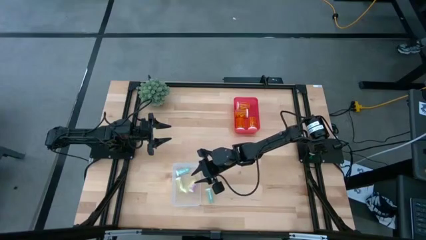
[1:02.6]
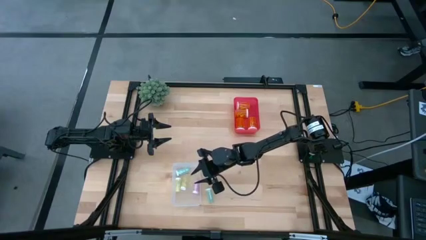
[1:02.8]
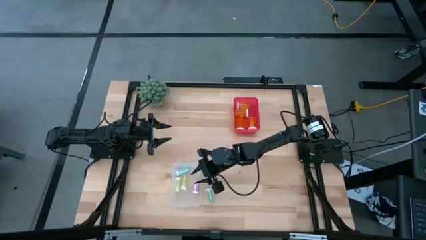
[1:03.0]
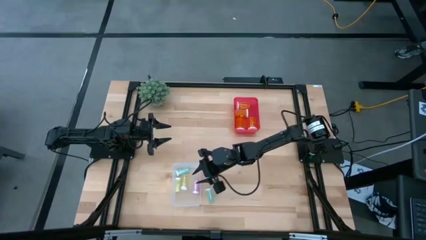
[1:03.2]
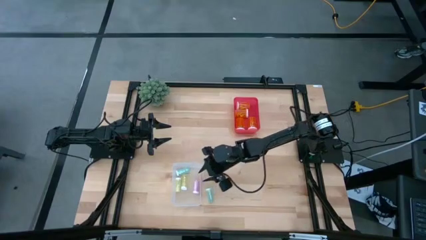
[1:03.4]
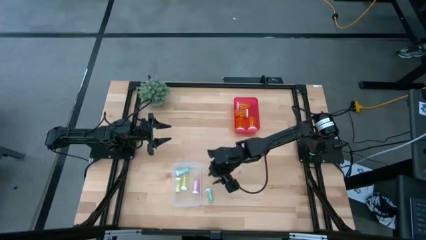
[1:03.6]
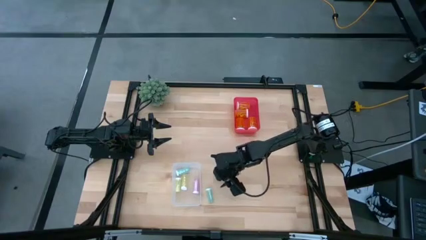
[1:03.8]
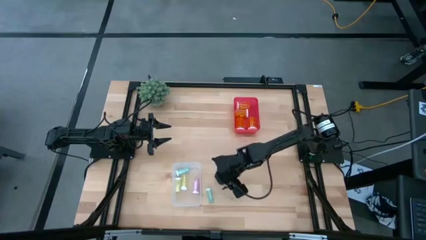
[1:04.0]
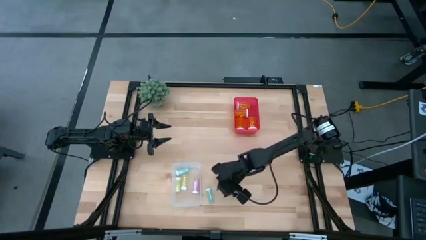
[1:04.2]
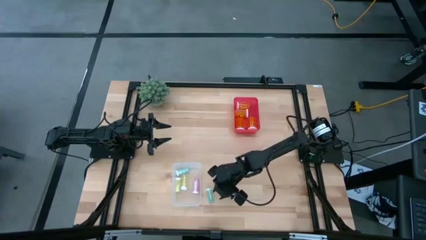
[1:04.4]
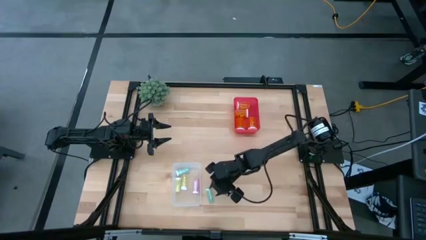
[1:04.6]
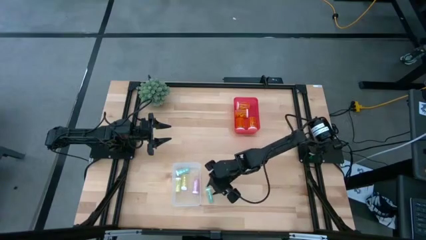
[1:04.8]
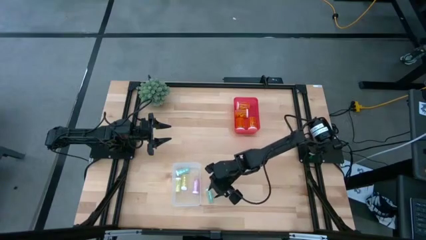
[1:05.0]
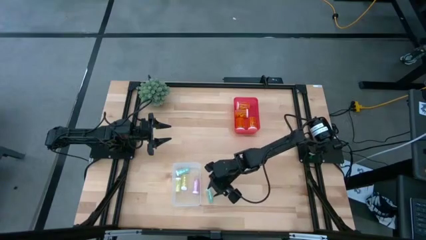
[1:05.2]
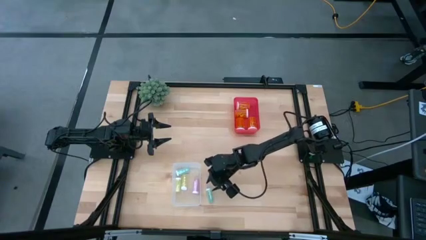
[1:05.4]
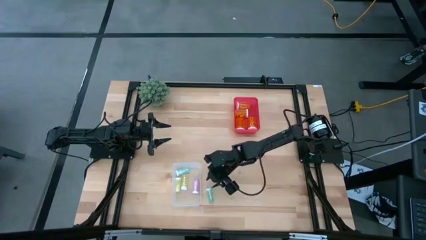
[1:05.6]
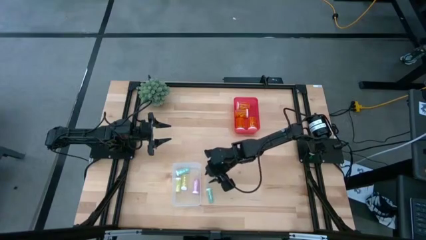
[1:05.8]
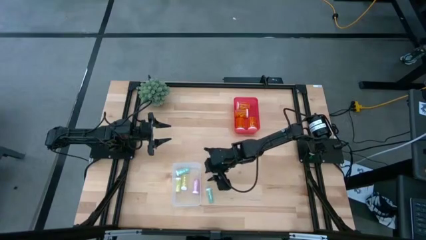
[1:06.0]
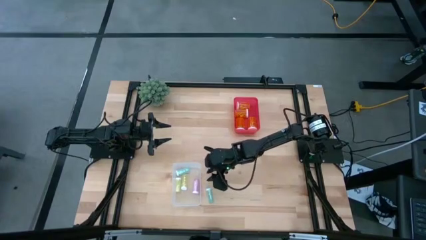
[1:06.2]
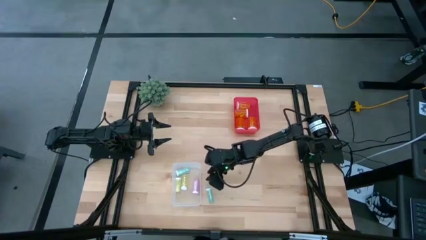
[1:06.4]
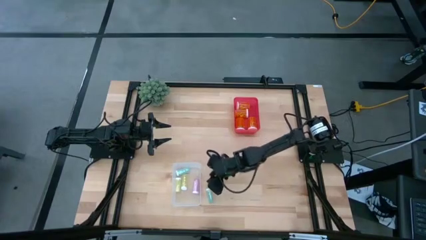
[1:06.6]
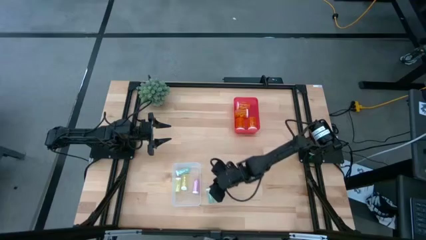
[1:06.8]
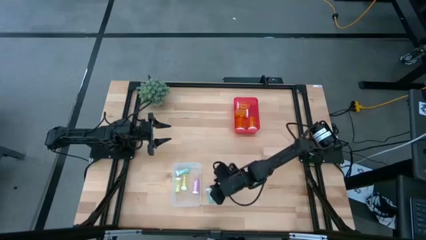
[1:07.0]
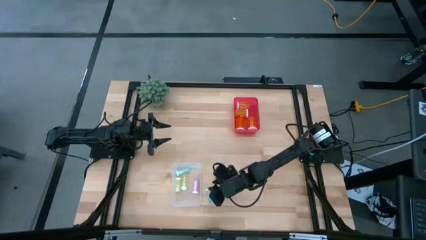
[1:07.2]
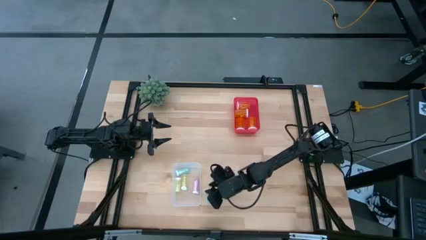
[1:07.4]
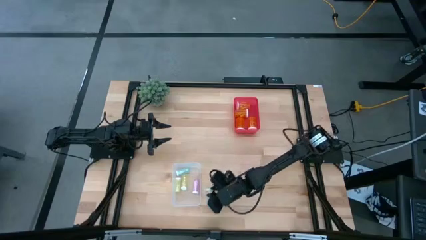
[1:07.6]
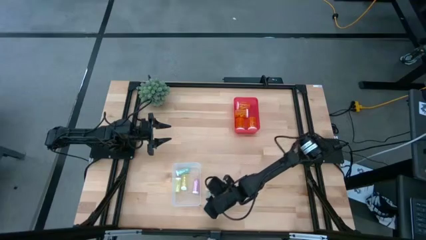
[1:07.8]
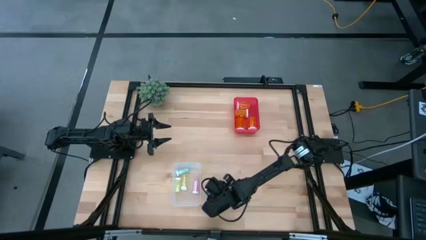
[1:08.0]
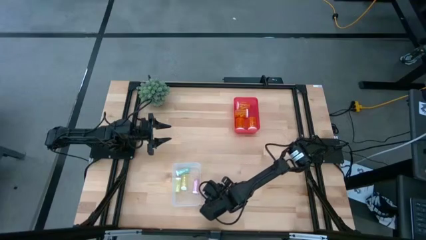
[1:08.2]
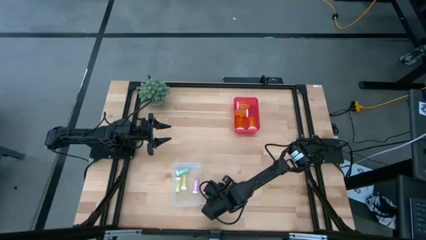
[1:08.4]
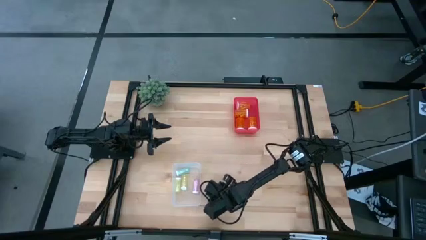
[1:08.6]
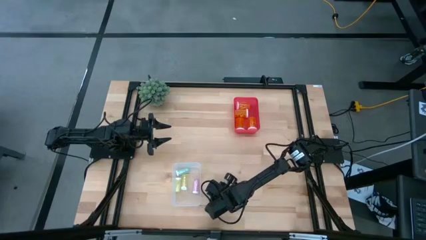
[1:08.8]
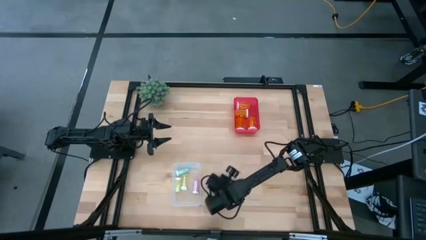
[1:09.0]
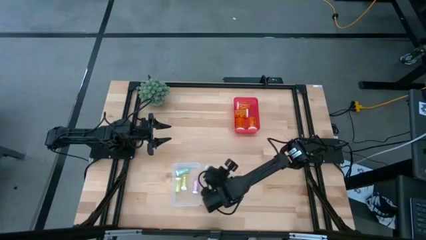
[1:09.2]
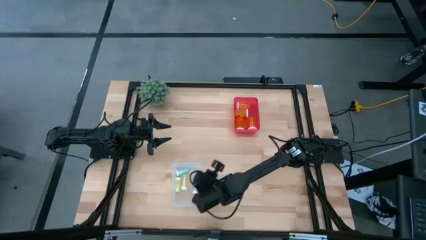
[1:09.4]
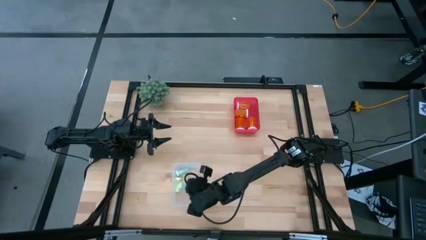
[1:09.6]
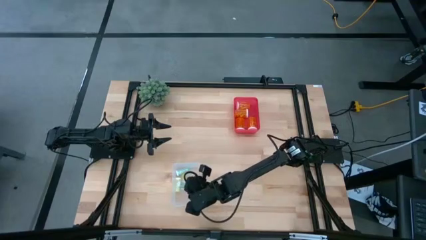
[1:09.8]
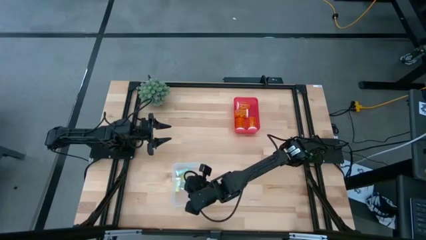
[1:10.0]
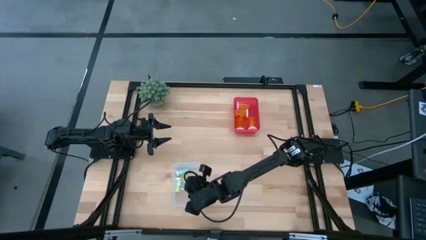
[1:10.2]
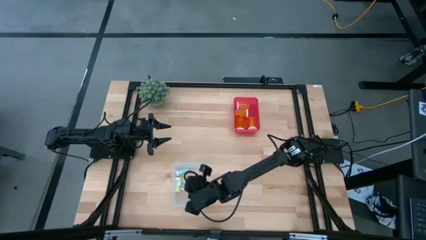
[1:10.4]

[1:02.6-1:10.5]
Task: Pick and place medicine bottles into bin by pill shape (circle, oval)
Put the small green pill bottle into the transparent bin

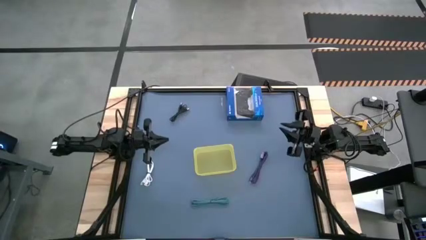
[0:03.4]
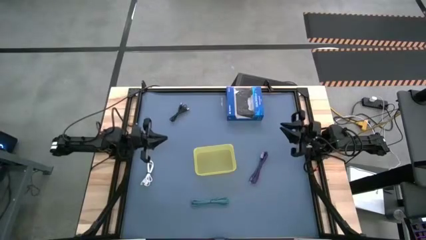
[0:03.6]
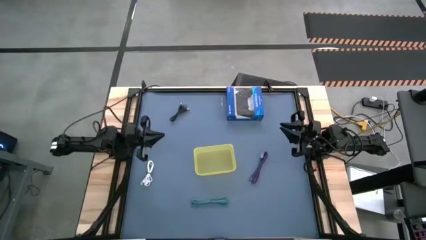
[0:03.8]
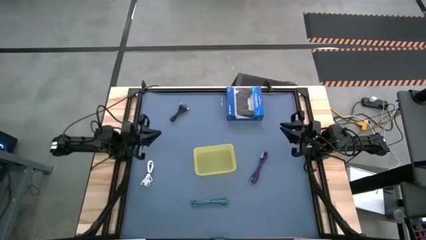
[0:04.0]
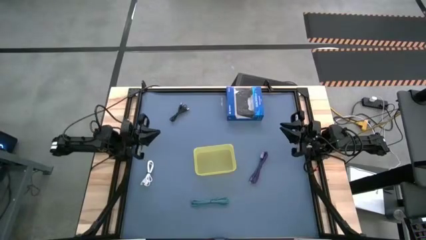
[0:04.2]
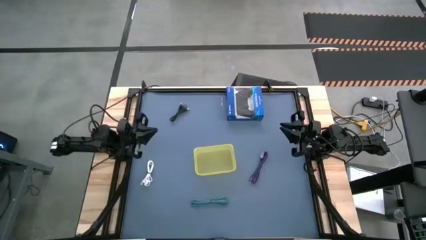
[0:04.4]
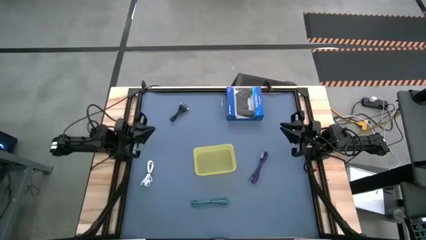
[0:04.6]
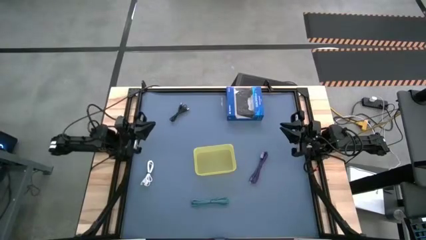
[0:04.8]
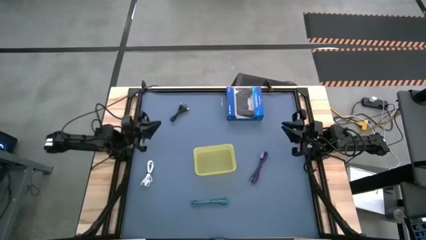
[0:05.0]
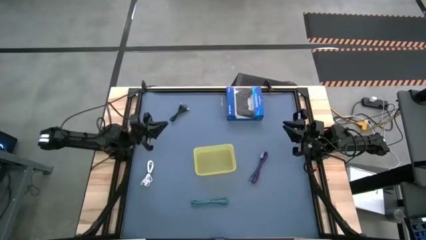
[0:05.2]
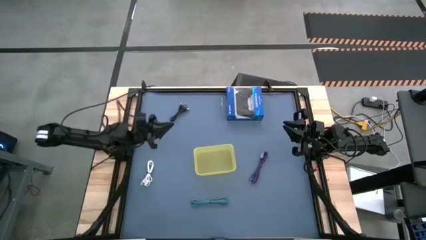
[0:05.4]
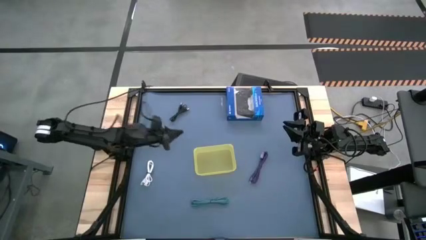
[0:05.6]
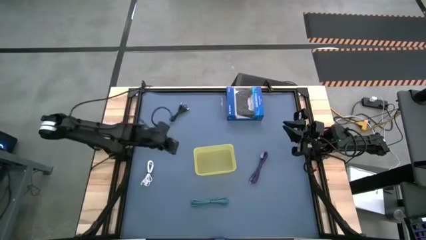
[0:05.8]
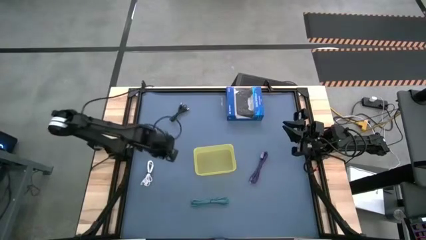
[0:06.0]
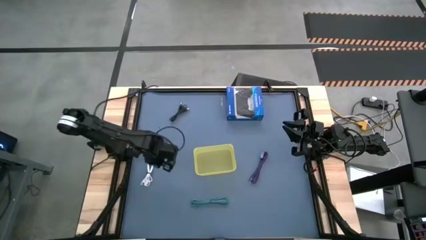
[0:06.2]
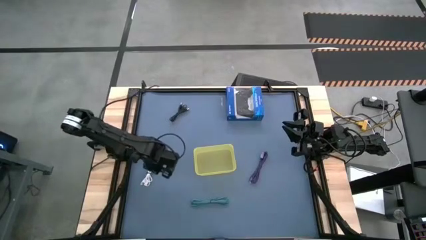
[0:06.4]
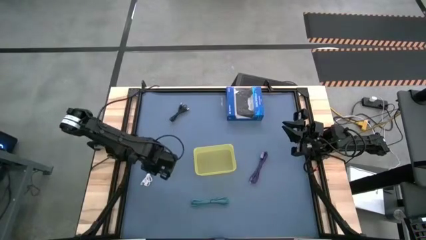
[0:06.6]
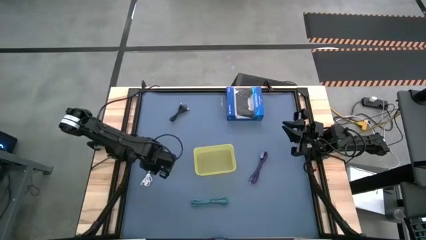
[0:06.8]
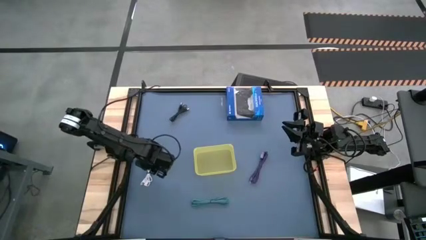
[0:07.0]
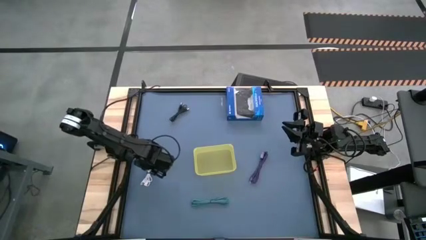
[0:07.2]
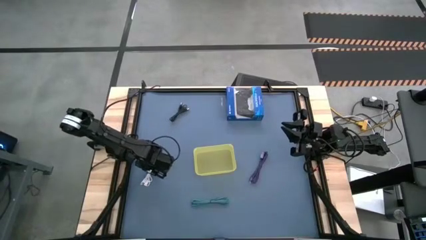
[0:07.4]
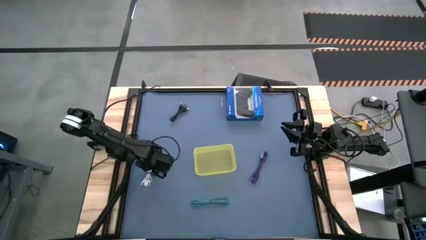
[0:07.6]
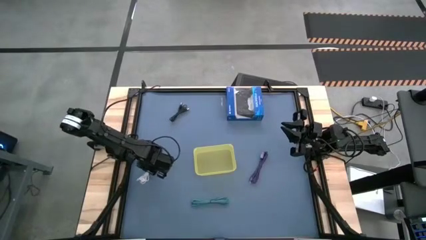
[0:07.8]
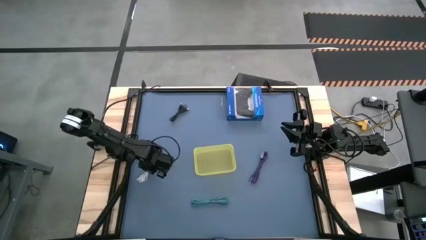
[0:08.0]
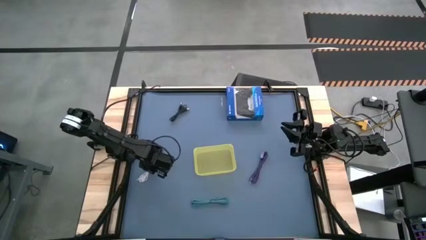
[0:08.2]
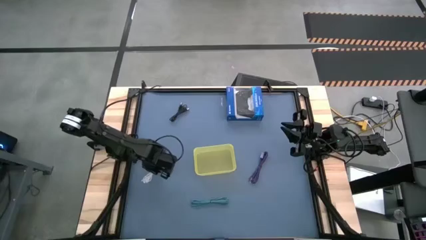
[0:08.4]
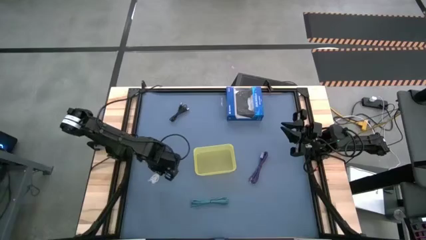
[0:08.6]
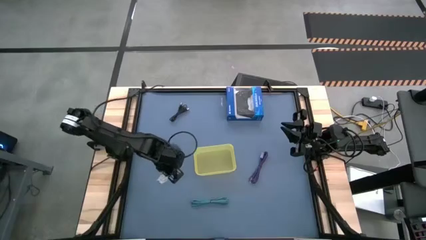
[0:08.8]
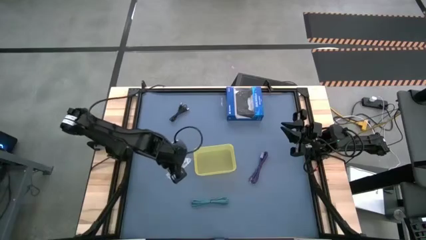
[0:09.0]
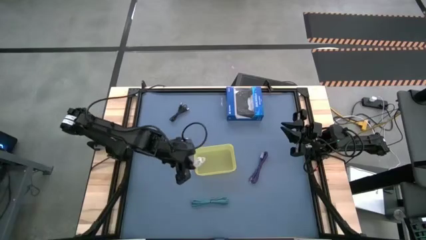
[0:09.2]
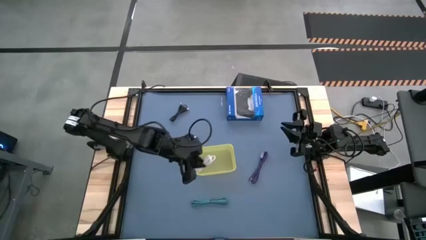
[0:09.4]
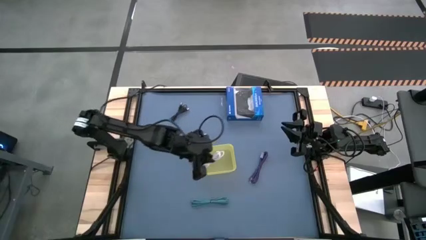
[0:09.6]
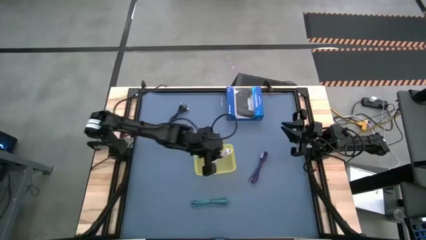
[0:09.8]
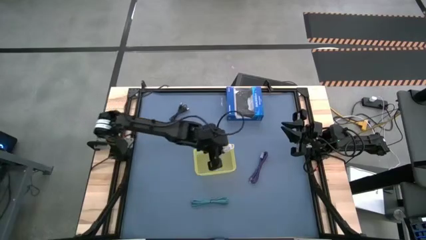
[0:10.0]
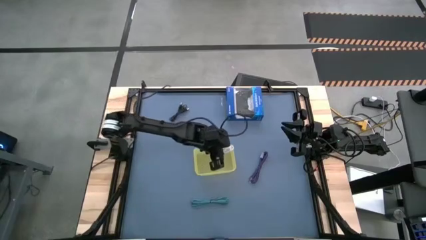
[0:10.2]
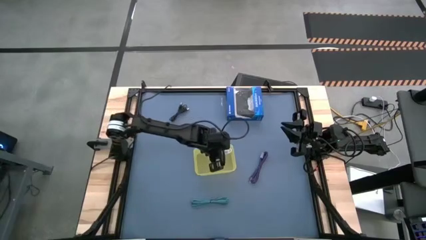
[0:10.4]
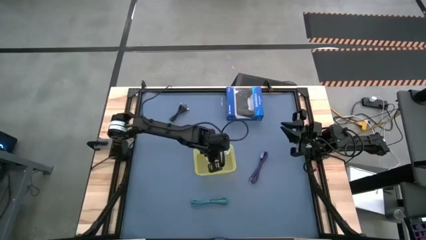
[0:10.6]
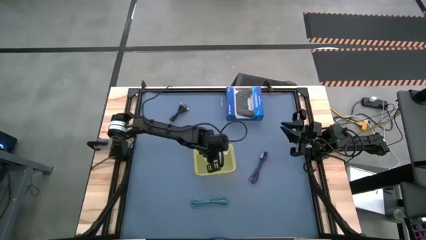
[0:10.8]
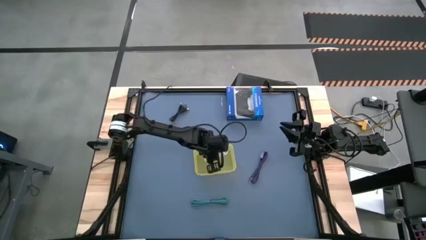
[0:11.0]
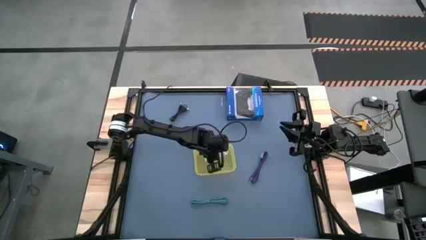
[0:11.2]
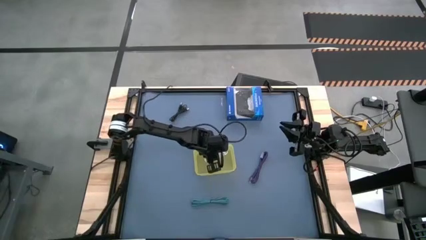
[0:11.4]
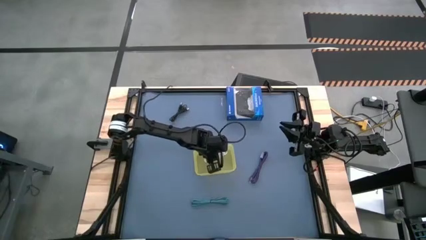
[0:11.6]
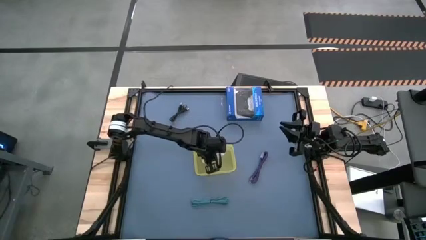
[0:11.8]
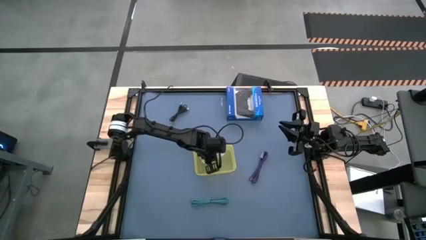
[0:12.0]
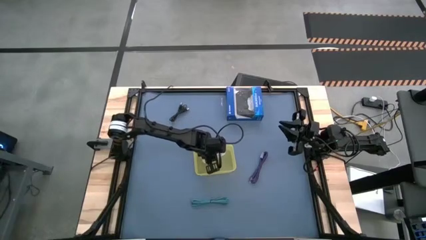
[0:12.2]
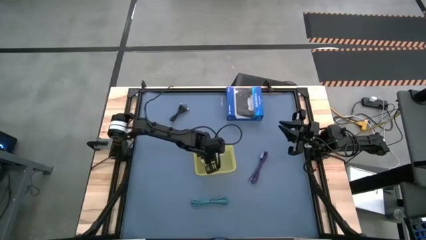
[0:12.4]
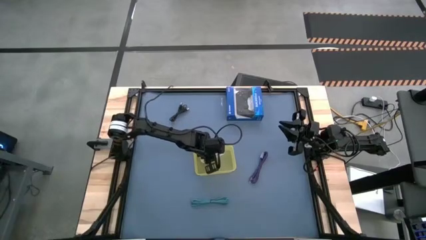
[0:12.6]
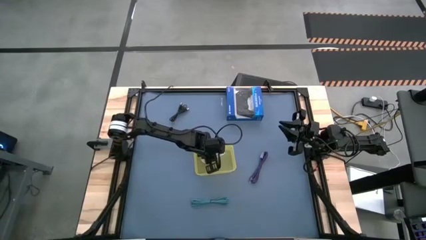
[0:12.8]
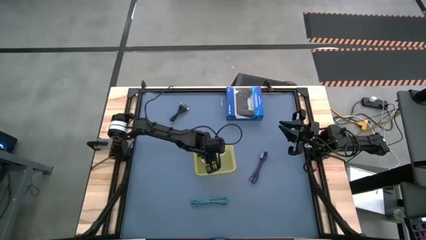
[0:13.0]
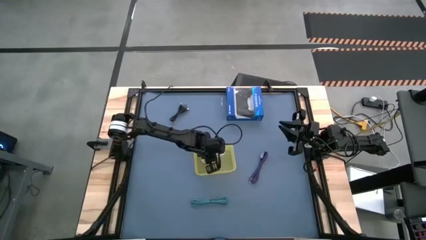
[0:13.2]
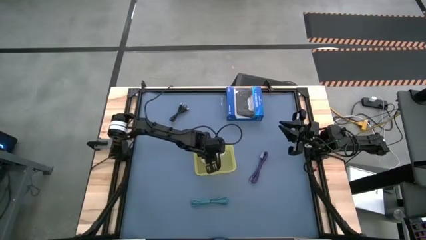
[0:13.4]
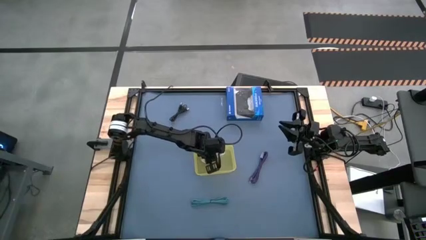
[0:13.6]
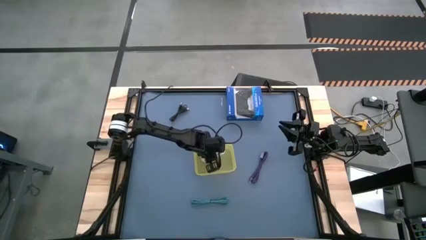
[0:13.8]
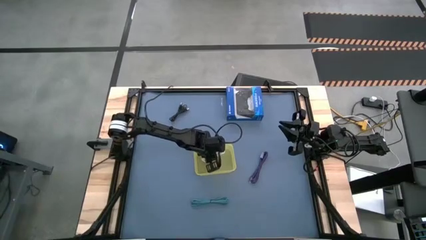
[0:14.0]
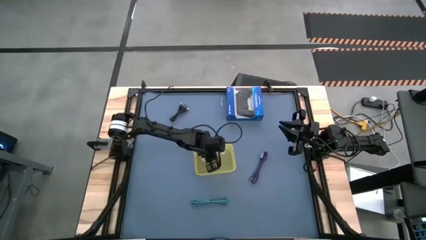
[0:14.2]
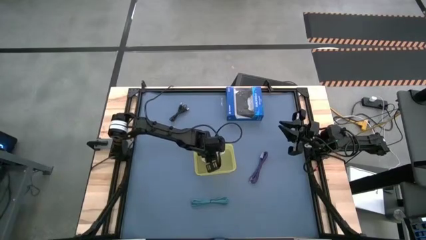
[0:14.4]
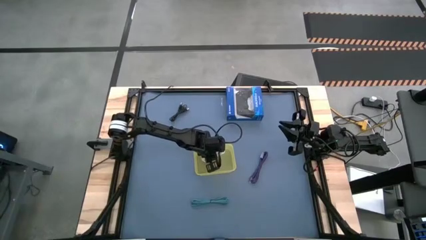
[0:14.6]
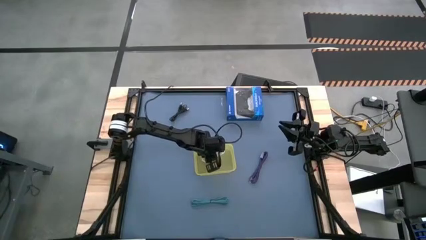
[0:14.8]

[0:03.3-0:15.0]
Task: Pick and place USB-C Cables
Put the white charger cable into the yellow bin
